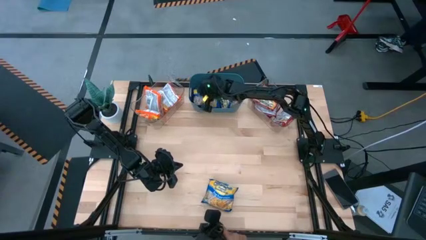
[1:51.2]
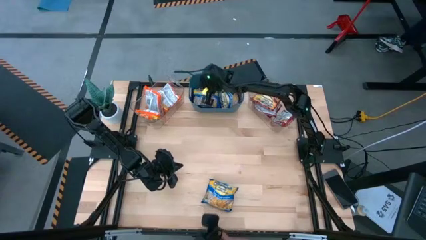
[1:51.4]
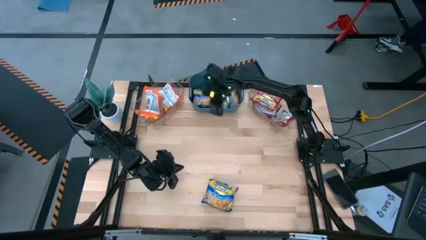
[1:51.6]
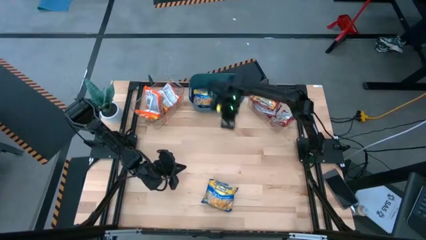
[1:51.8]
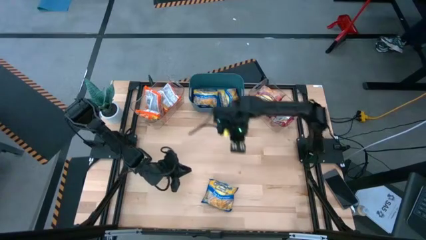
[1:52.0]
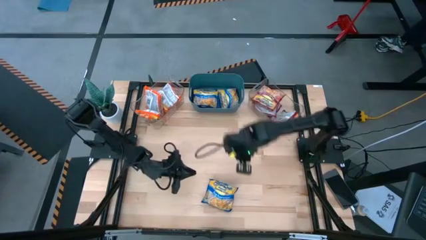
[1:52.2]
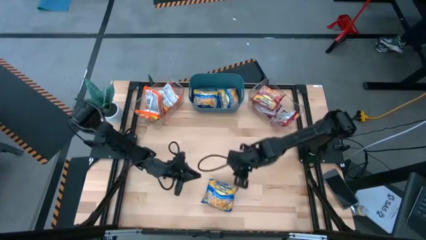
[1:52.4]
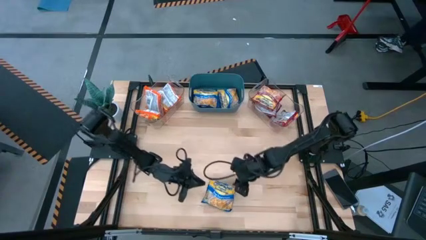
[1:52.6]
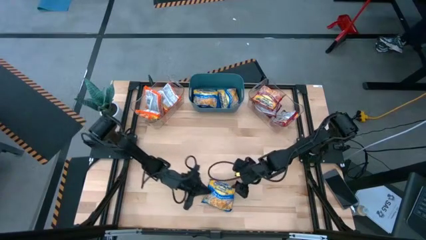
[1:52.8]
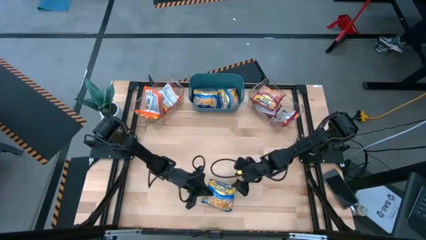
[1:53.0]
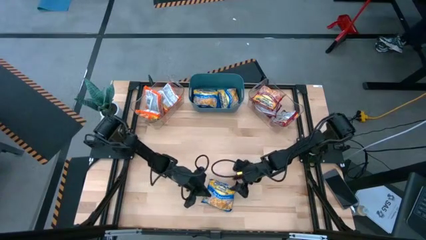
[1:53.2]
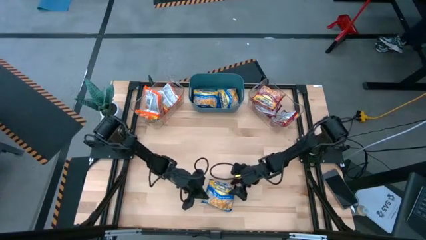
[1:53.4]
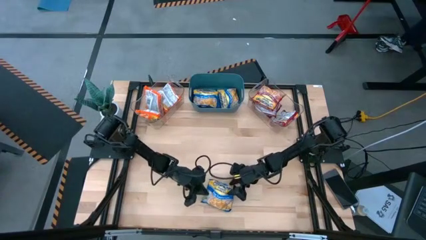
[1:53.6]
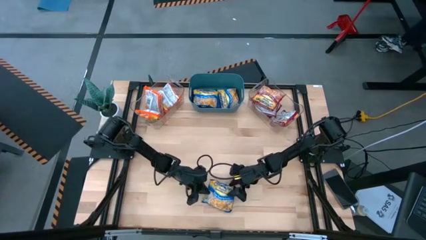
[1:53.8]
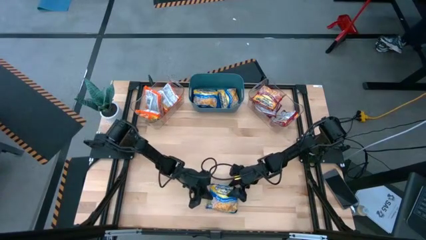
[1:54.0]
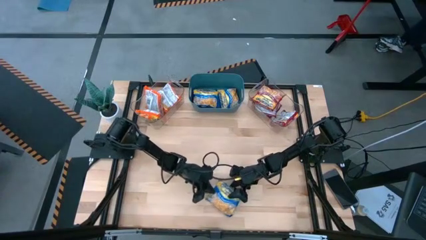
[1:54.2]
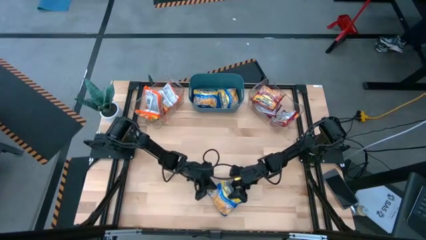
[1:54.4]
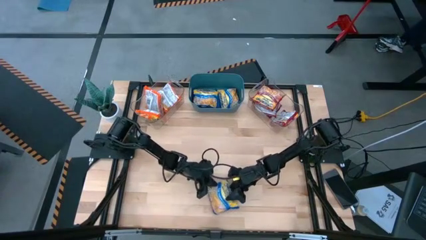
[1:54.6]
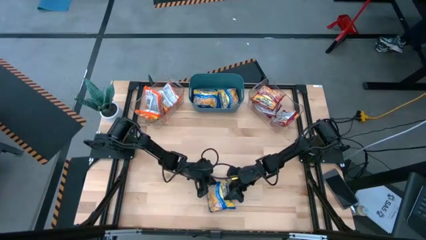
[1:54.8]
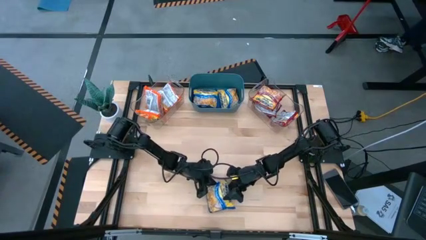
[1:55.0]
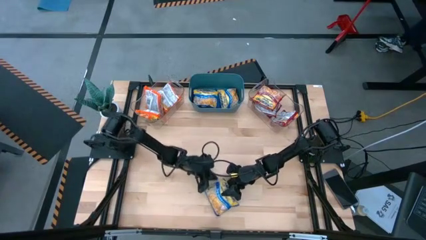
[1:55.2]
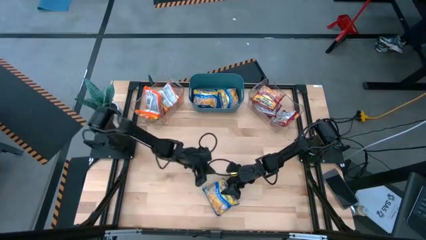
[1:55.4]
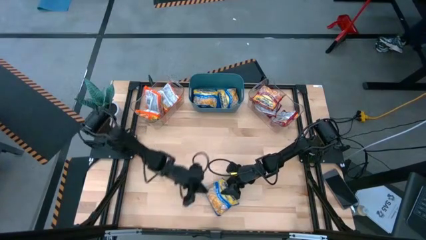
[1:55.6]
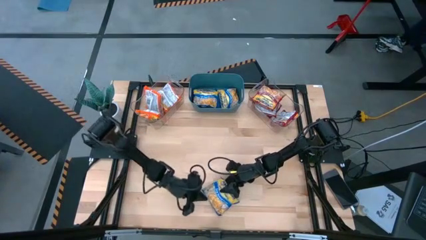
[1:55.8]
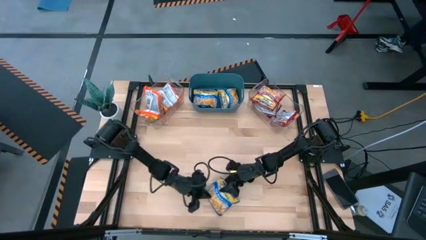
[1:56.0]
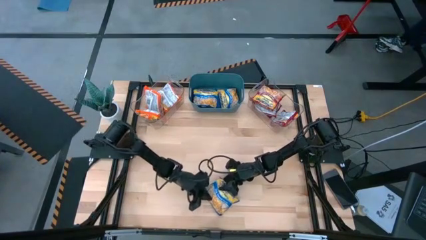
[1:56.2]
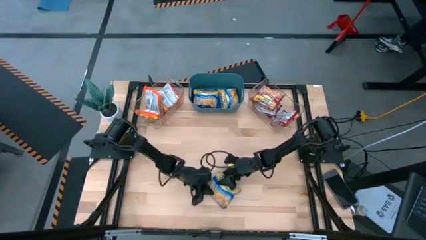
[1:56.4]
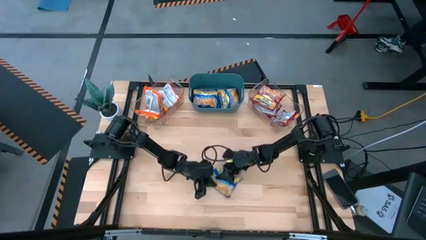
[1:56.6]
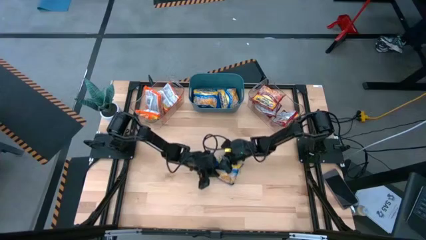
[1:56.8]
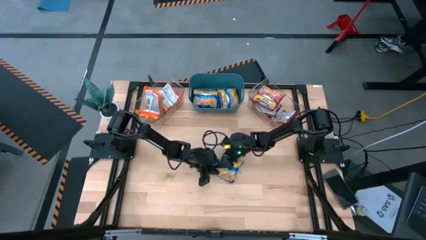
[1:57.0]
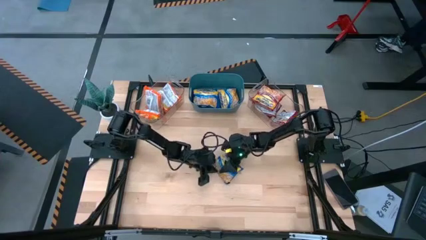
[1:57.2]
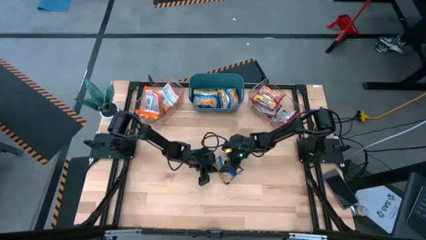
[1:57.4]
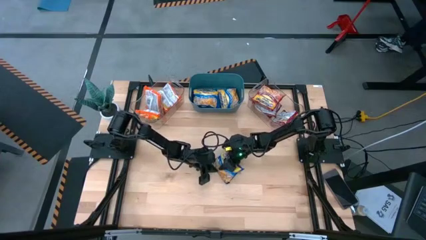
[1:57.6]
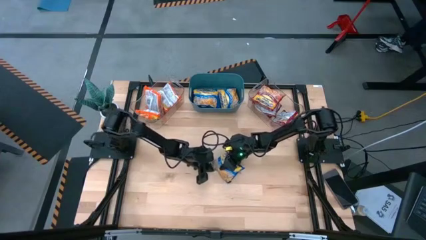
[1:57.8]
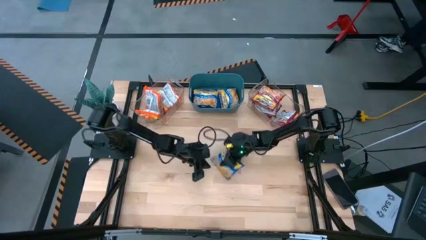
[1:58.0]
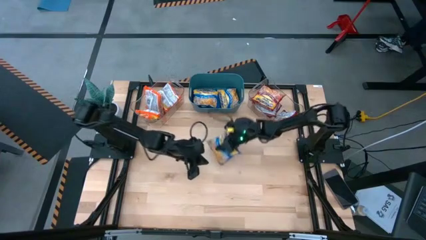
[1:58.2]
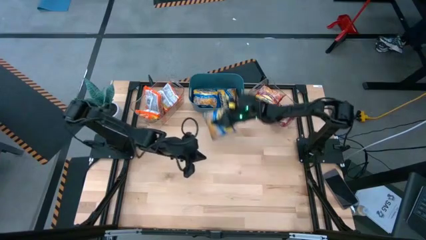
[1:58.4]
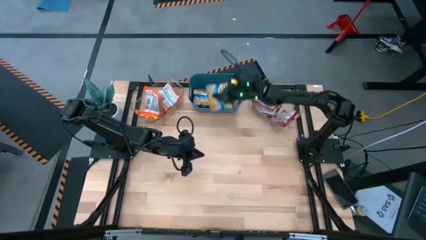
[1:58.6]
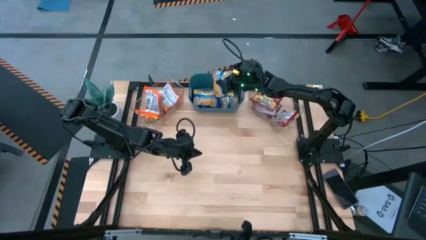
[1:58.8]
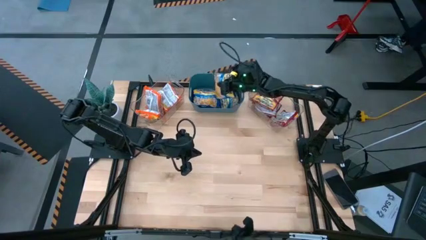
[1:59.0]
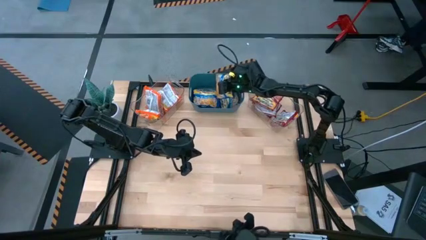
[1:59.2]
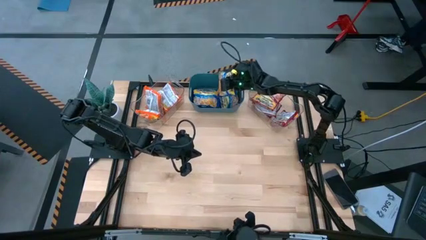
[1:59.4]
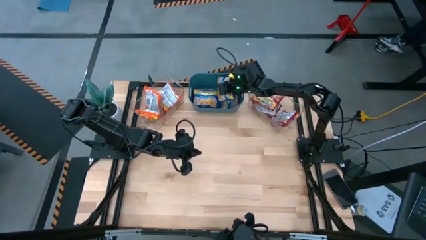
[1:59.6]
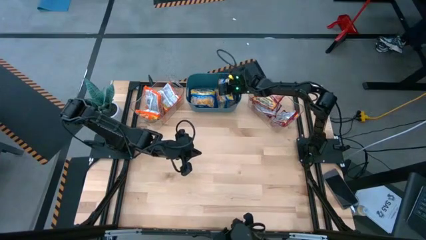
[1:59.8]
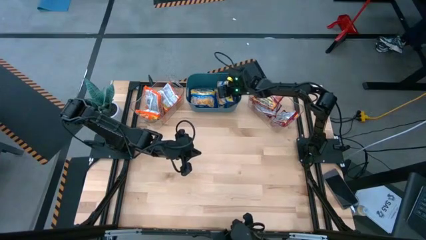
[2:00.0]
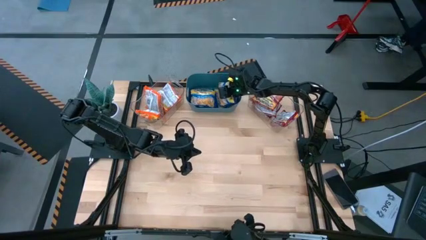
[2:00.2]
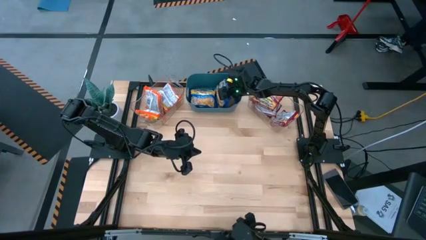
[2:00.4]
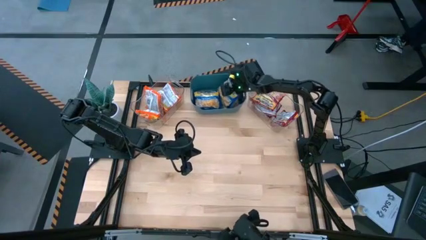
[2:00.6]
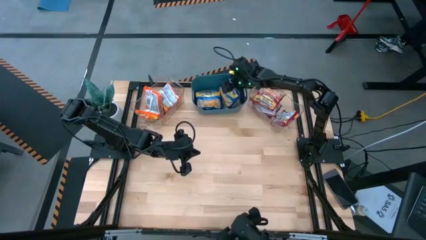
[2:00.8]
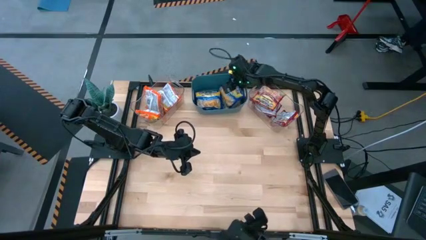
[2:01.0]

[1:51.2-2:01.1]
Task: Sort Maruchan noodles
Put the blue noodle pack into the blue bin

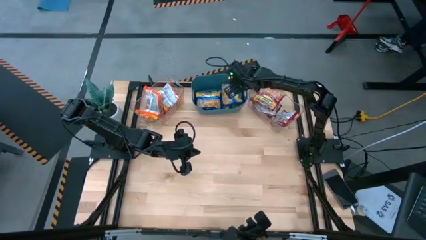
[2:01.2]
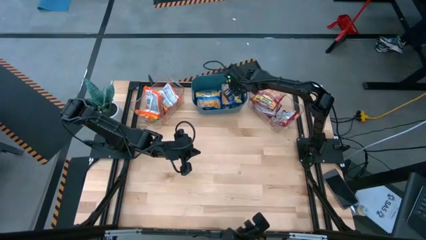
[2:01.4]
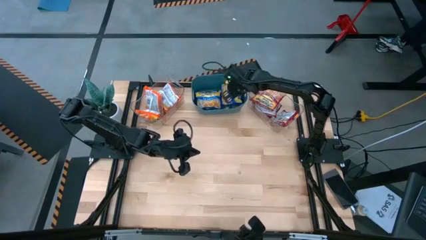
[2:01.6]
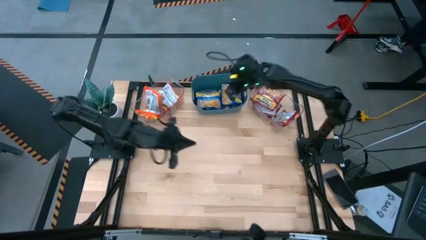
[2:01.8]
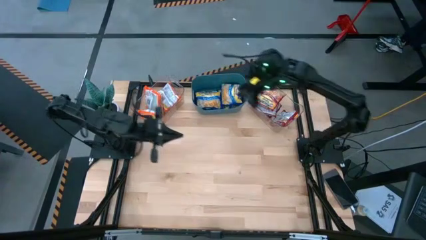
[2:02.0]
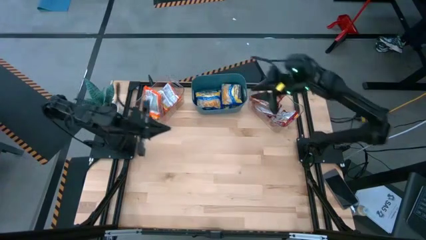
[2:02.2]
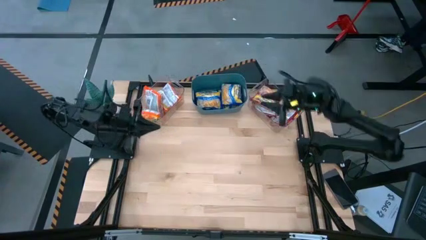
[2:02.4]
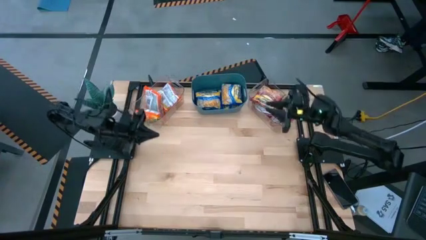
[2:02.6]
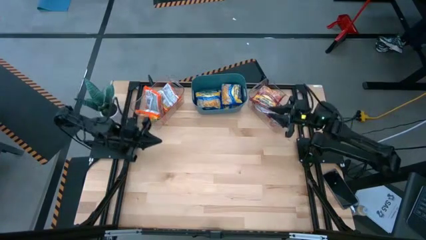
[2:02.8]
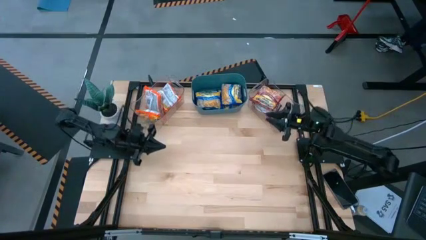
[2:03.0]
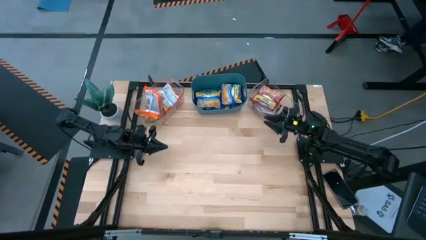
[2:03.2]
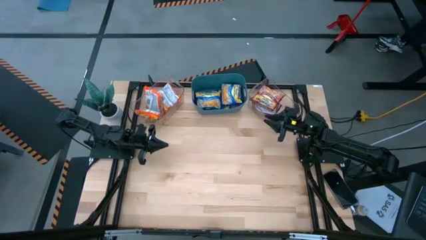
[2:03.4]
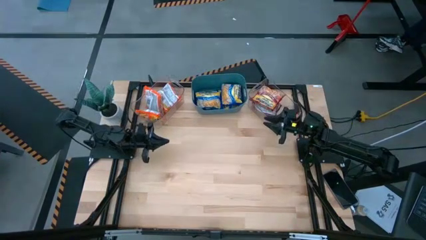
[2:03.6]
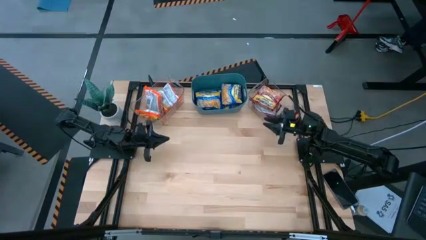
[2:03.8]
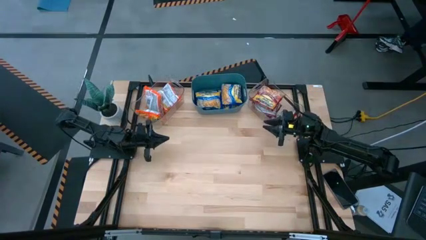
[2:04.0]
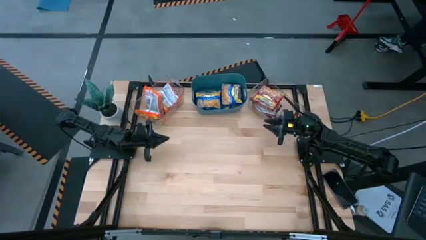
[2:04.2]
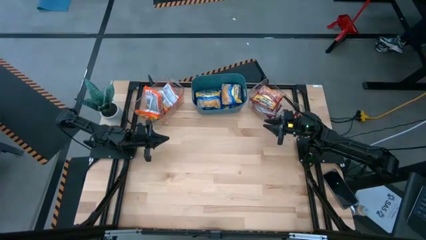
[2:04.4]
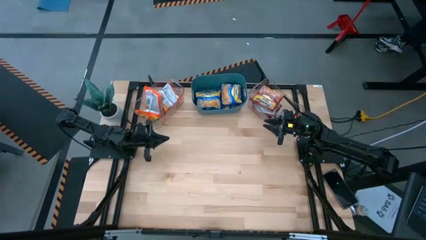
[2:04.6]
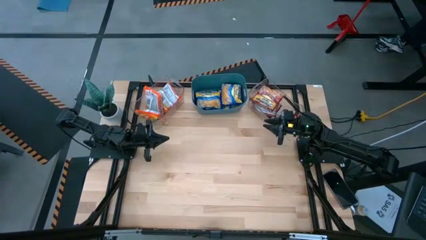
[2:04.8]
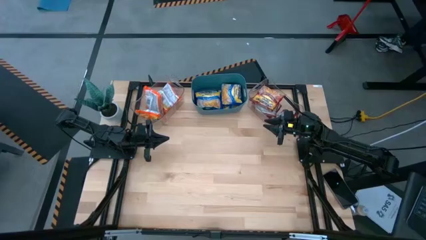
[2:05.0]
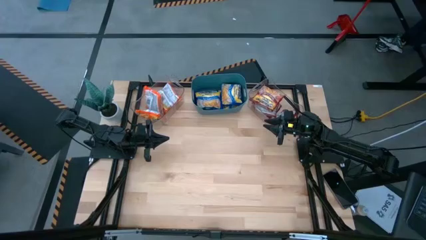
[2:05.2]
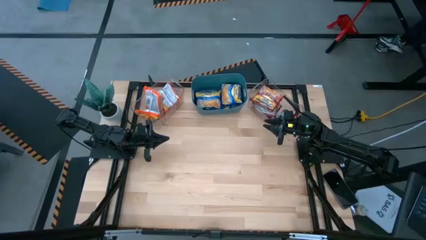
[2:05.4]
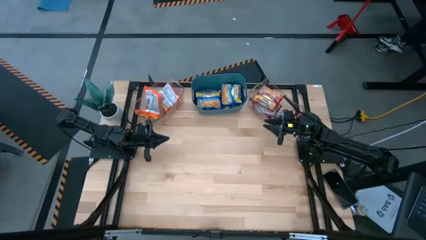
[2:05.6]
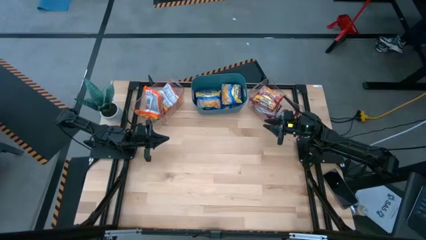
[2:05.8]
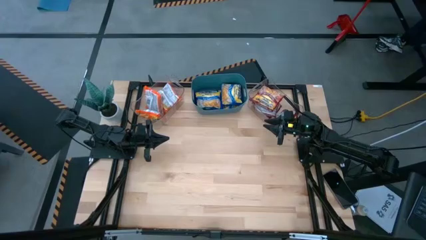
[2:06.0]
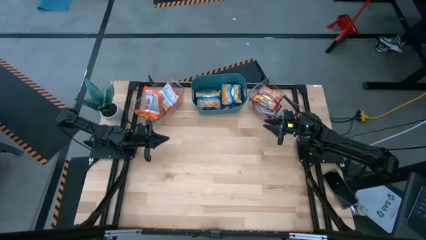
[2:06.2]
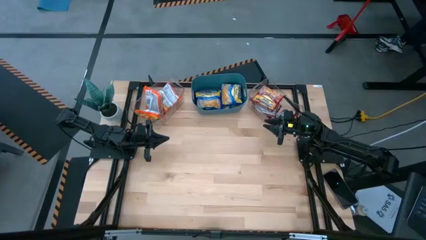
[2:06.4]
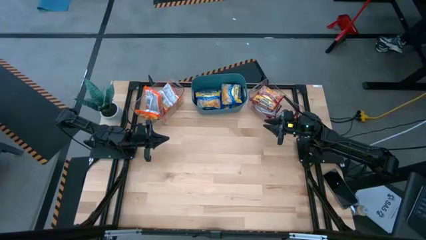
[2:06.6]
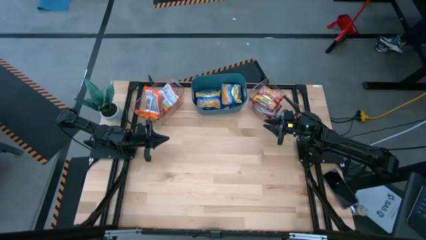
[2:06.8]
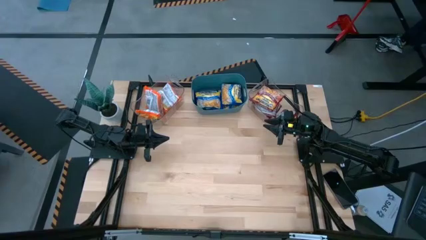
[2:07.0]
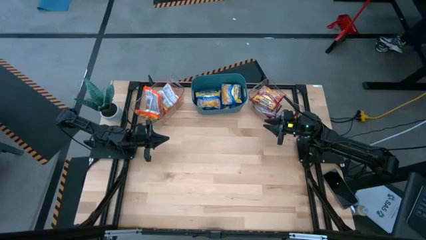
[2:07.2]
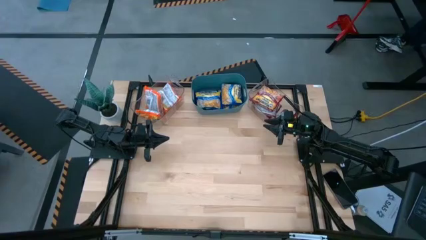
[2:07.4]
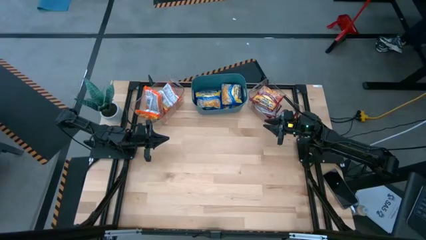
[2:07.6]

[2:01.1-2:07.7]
Return to Home Position
